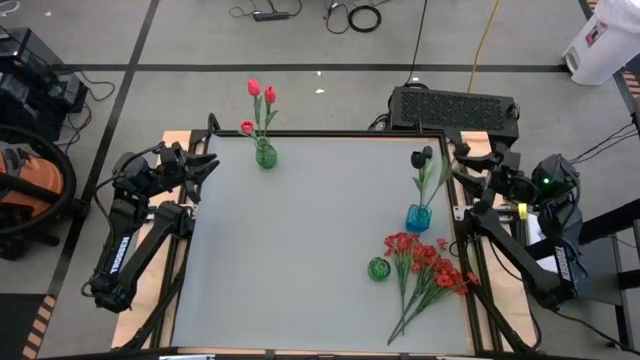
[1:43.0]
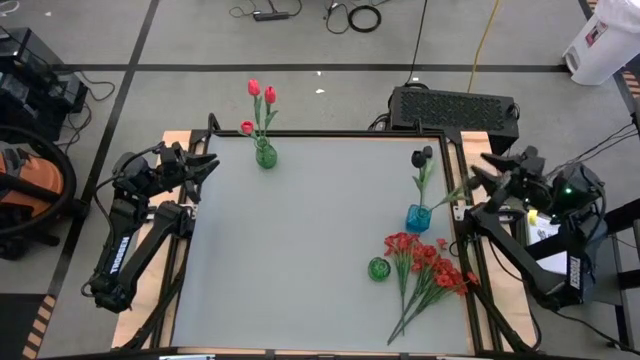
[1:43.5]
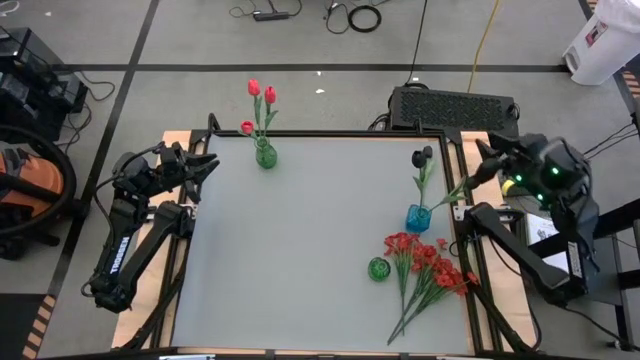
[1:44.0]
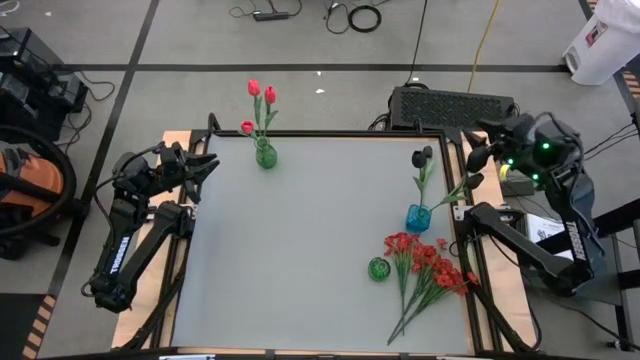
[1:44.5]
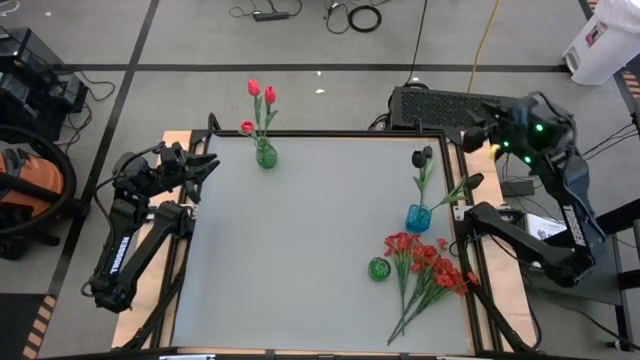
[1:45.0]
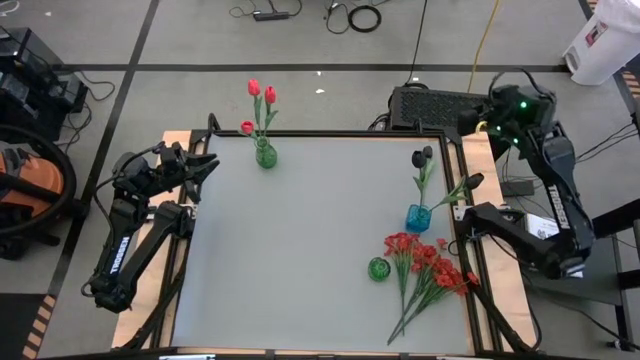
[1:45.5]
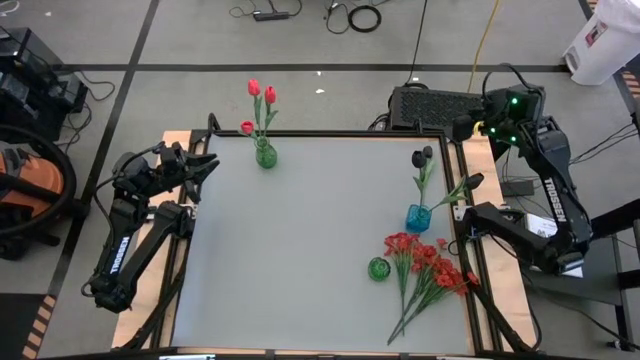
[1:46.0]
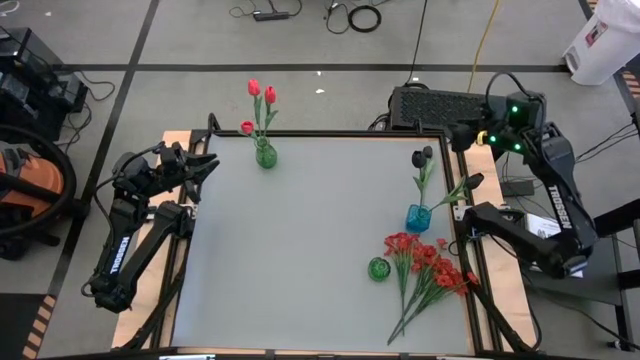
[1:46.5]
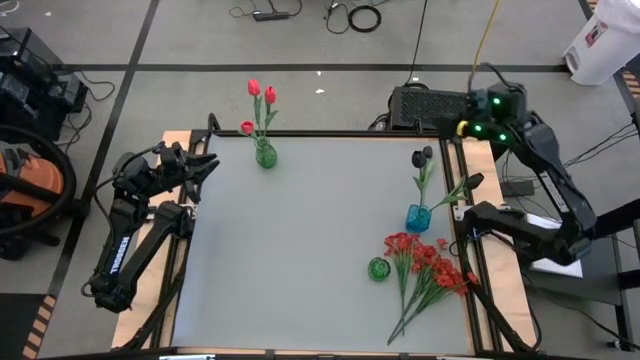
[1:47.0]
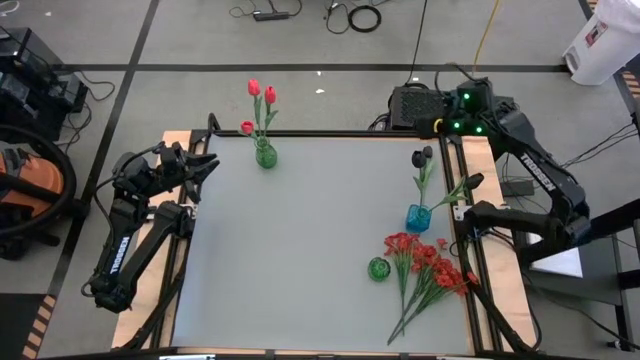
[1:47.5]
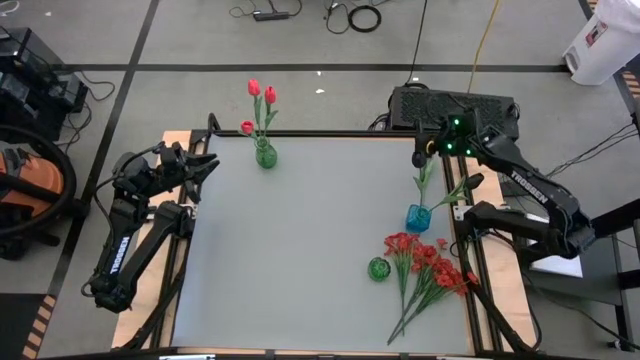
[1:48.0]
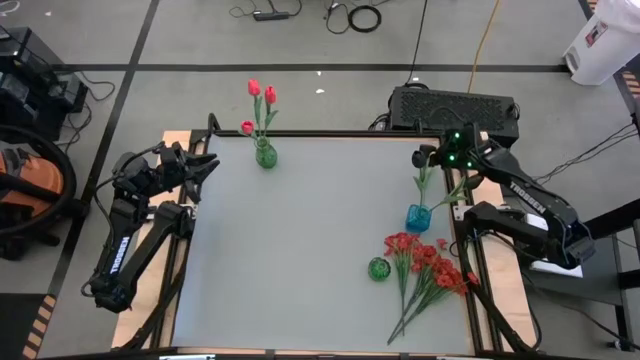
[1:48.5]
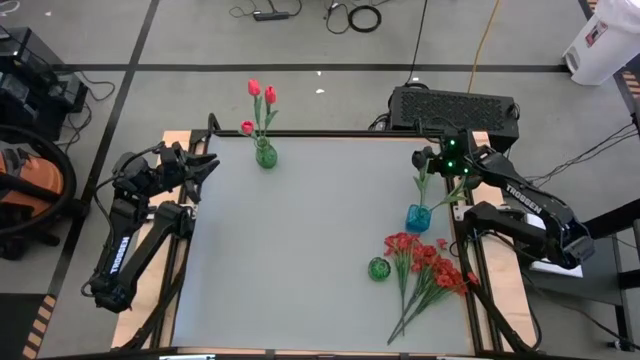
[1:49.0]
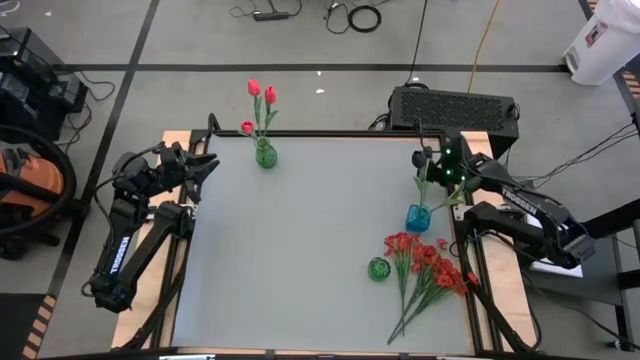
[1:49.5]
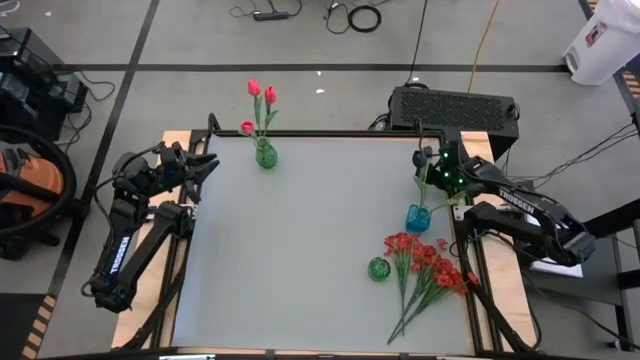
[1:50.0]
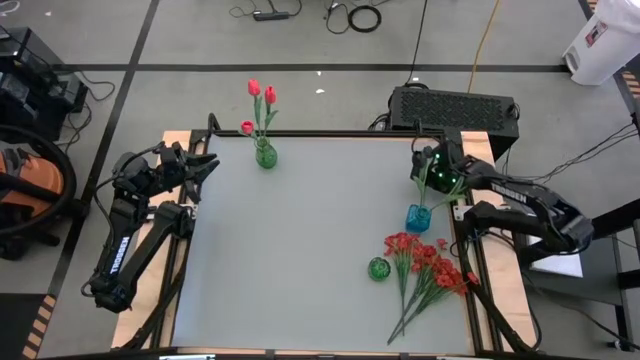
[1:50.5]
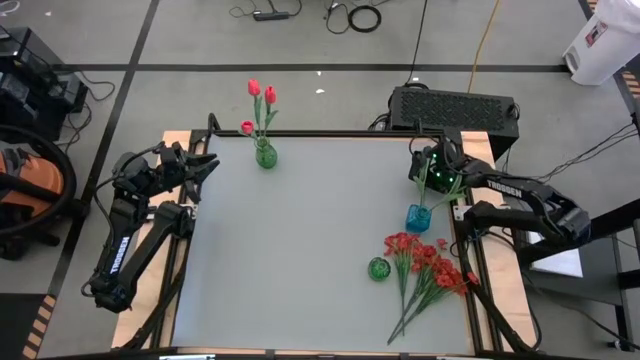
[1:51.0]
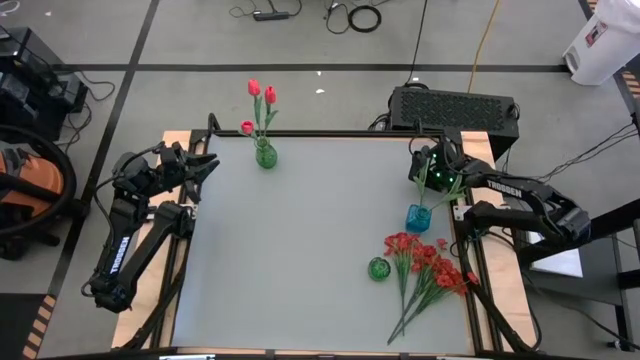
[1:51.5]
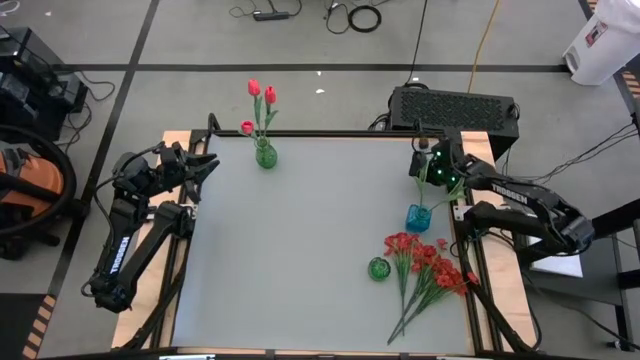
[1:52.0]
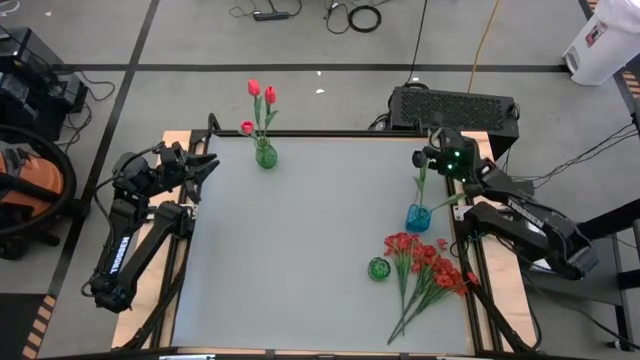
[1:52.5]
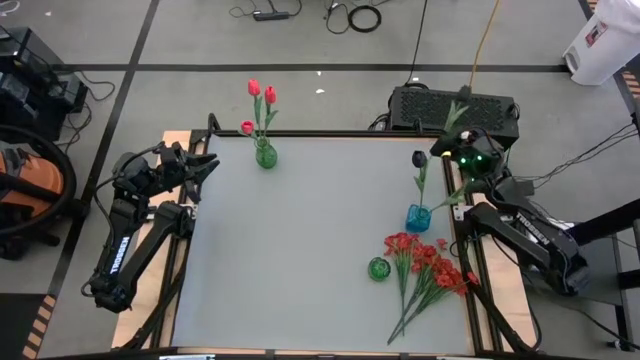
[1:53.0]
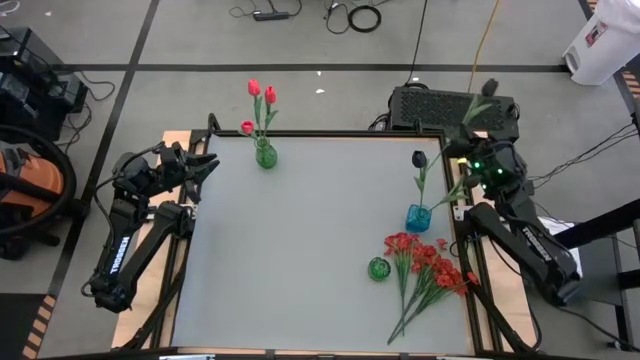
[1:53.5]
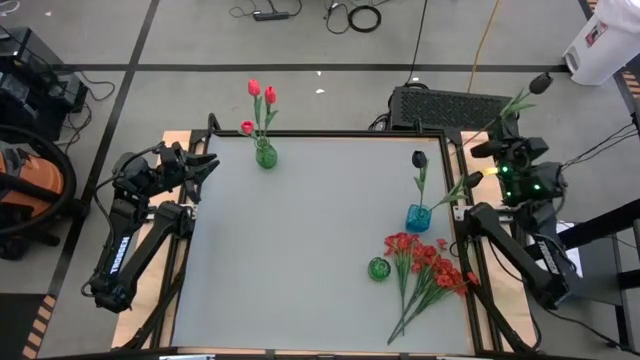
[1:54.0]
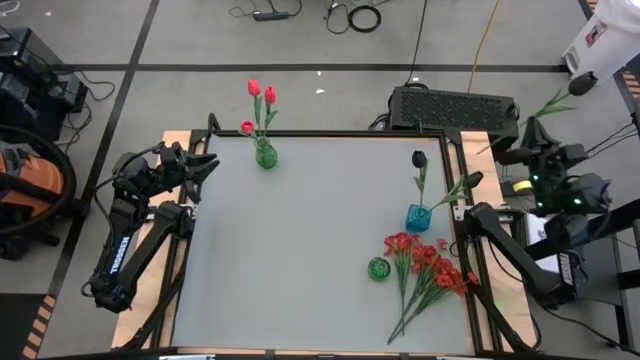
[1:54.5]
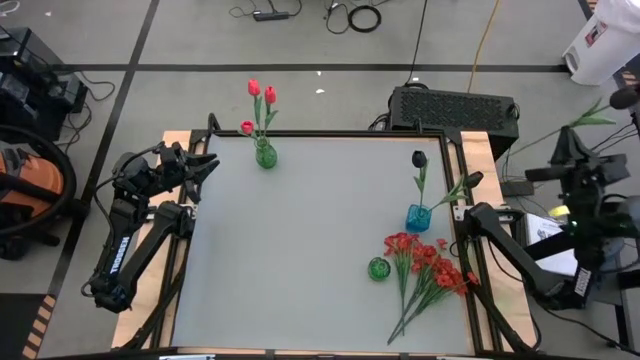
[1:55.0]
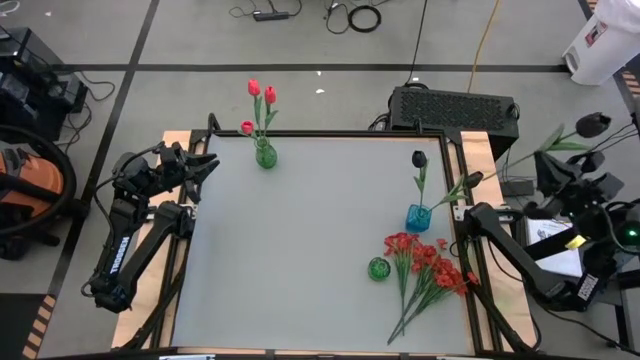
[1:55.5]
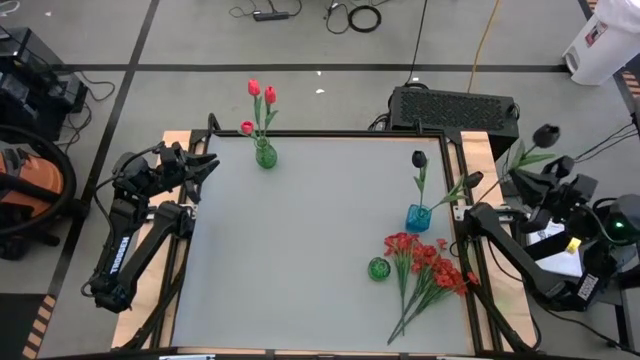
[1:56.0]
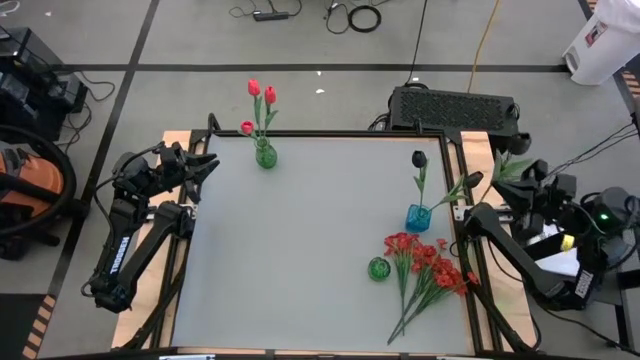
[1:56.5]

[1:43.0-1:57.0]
Task: Sort flowers into vase by color
Put the black flower into the right green vase

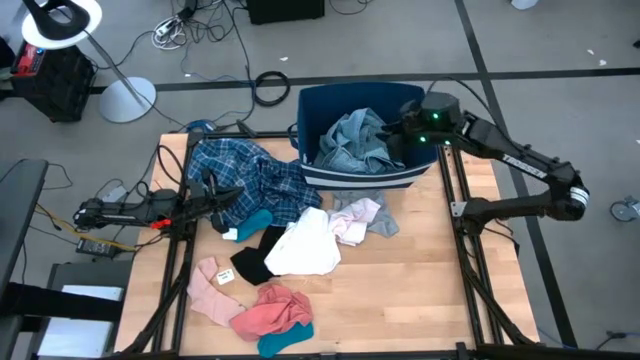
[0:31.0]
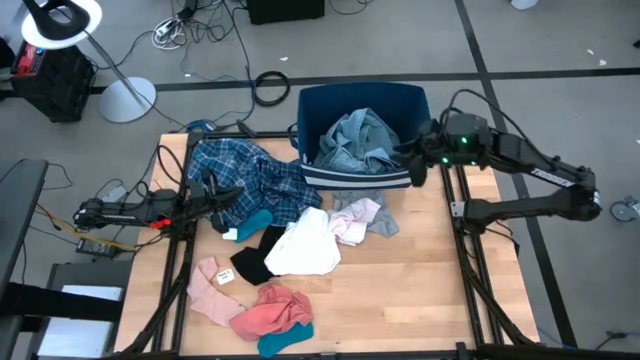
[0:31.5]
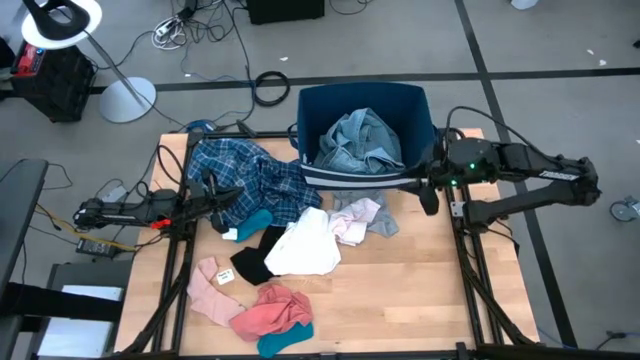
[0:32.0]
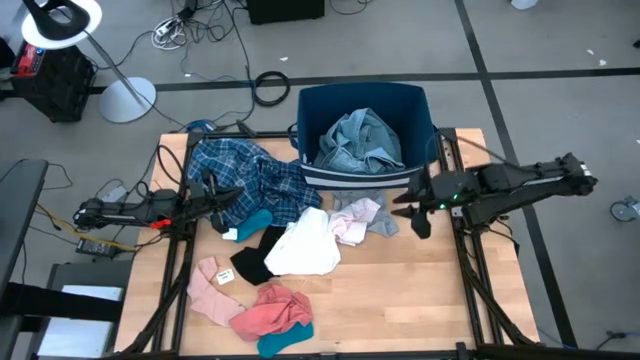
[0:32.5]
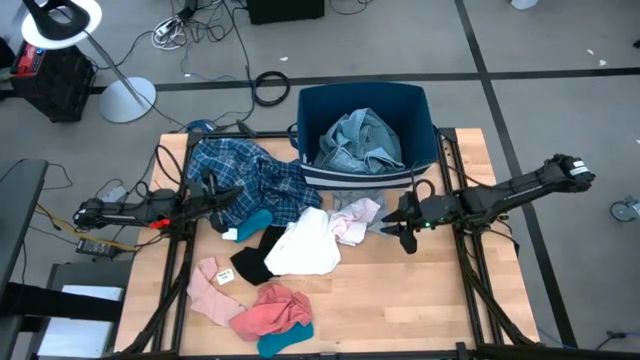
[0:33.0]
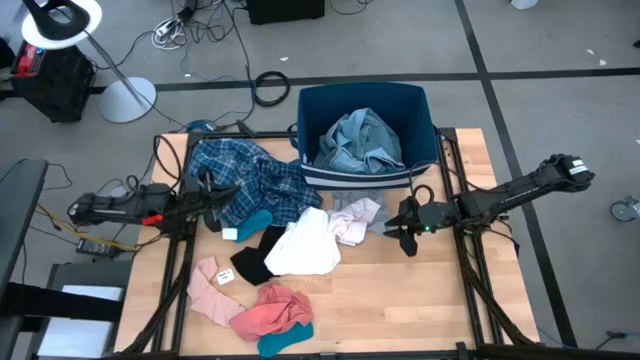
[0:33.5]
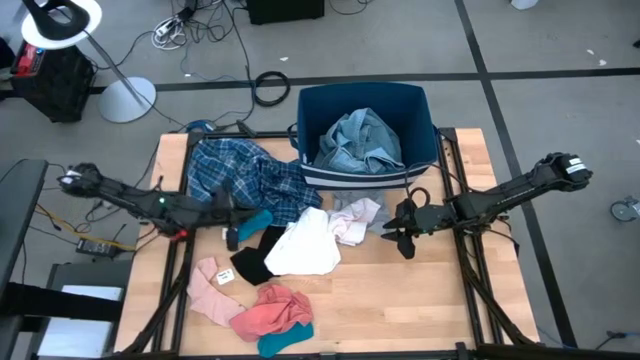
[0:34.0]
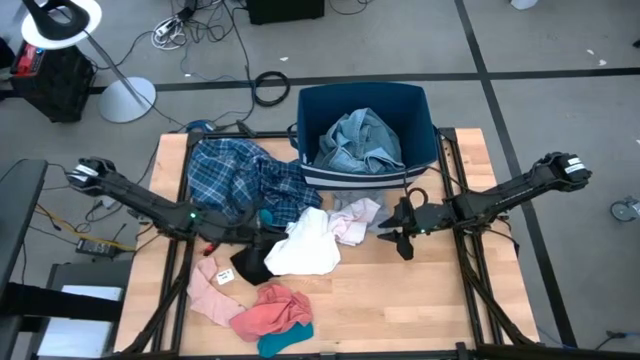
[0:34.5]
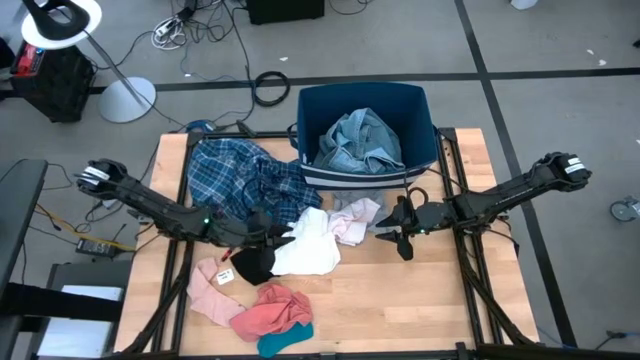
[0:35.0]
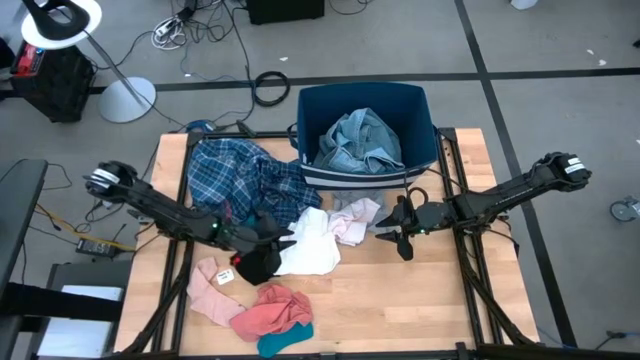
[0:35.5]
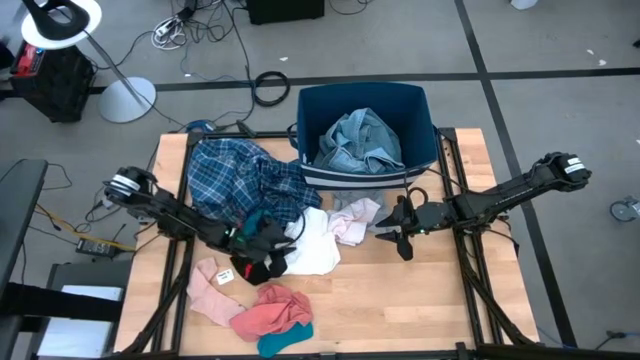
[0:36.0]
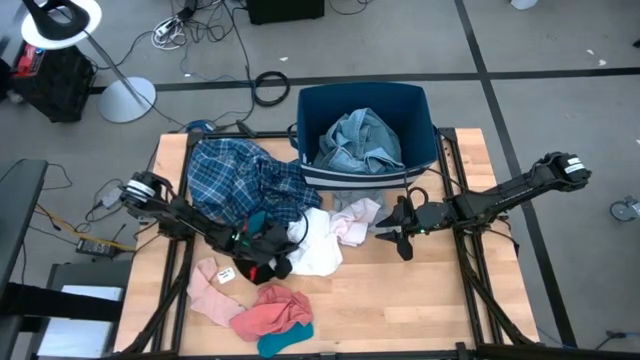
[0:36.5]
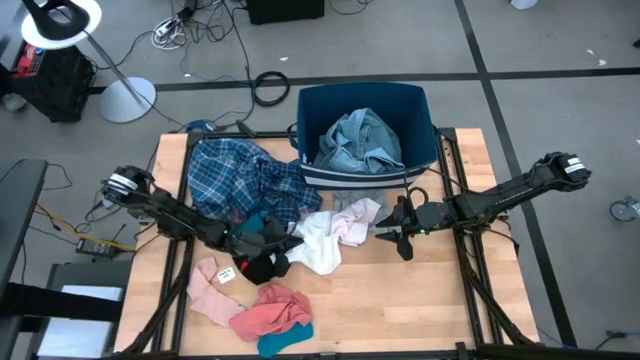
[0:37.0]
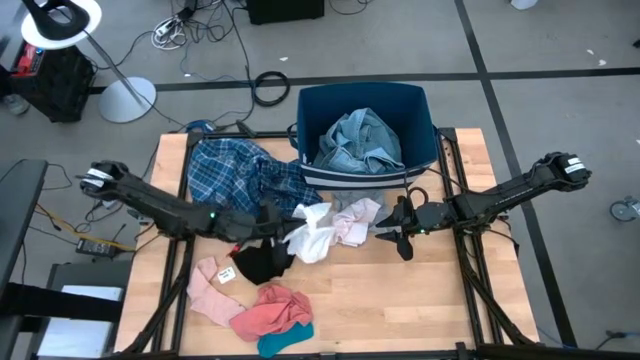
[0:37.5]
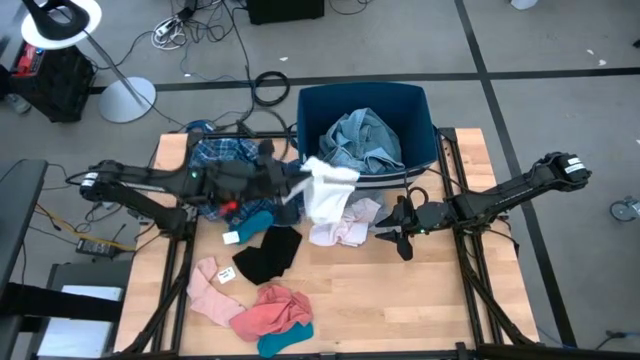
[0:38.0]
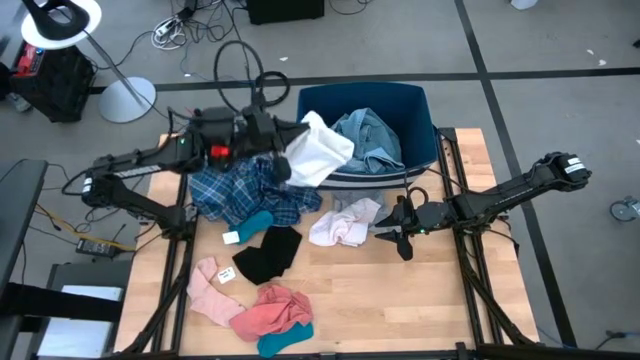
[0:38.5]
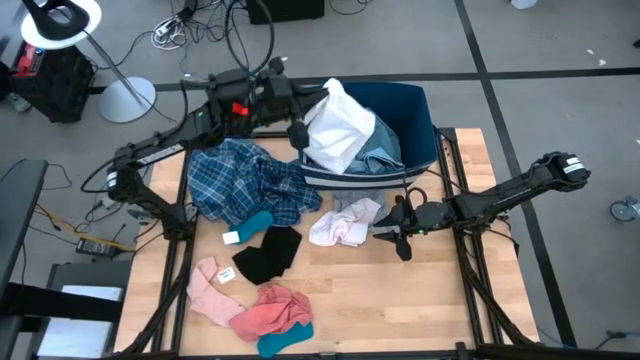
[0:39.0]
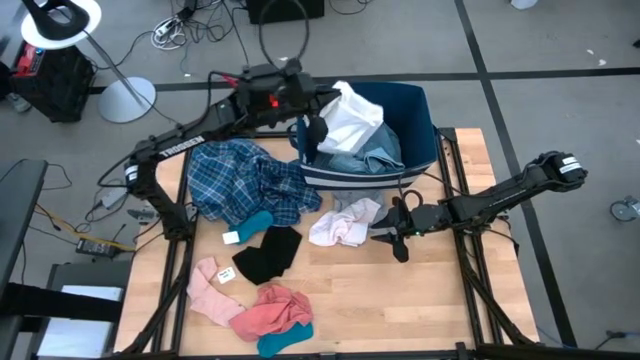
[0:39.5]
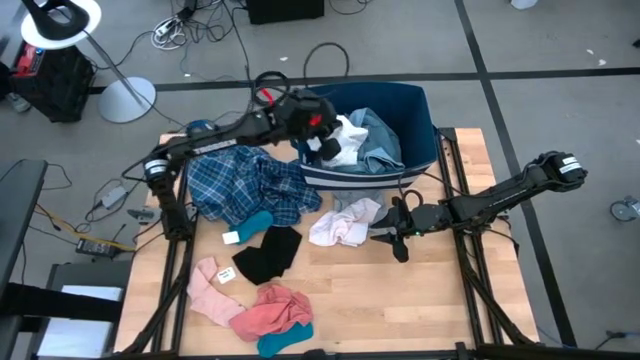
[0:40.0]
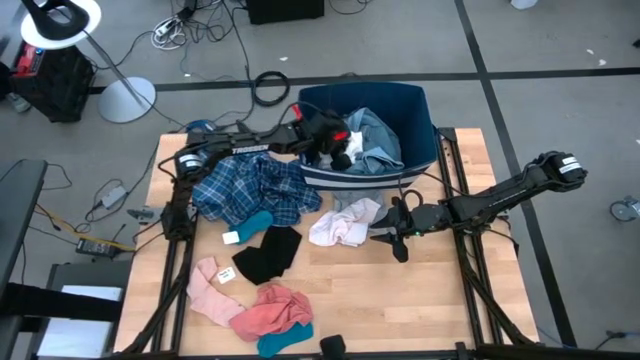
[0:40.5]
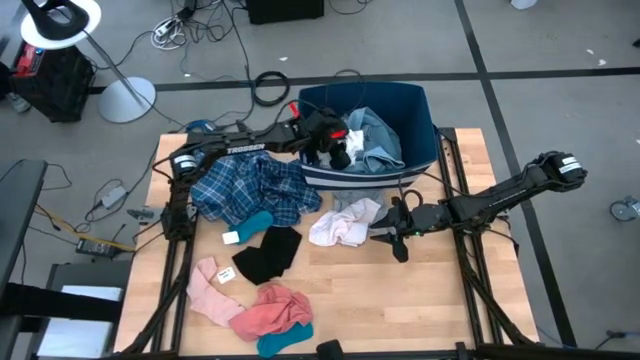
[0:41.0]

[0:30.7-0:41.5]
Task: Sort clothes
Put the white underwear into the blue bin
